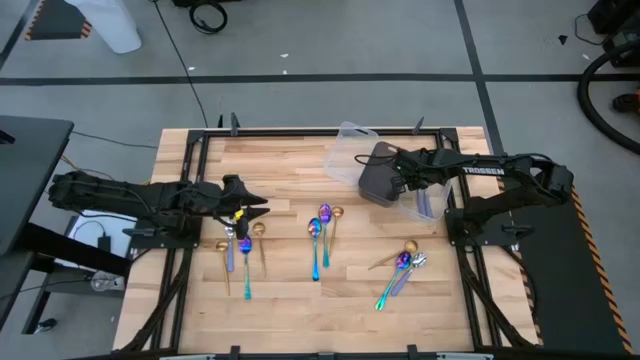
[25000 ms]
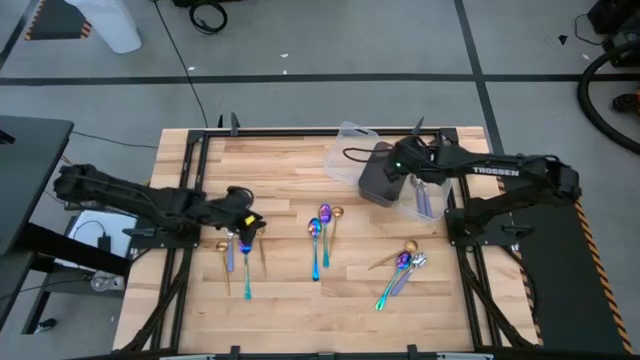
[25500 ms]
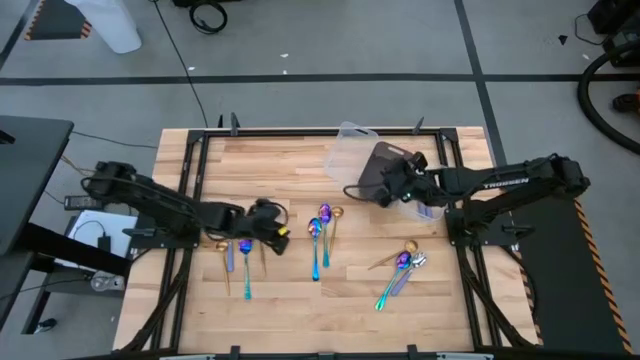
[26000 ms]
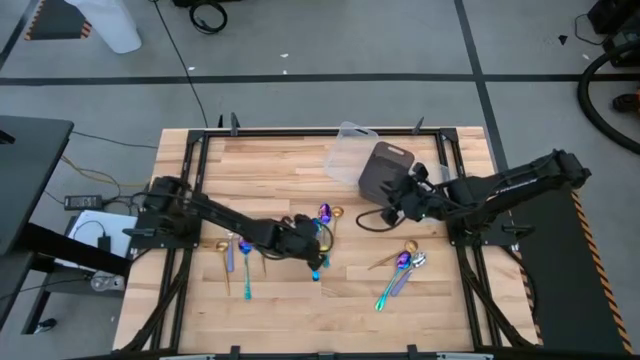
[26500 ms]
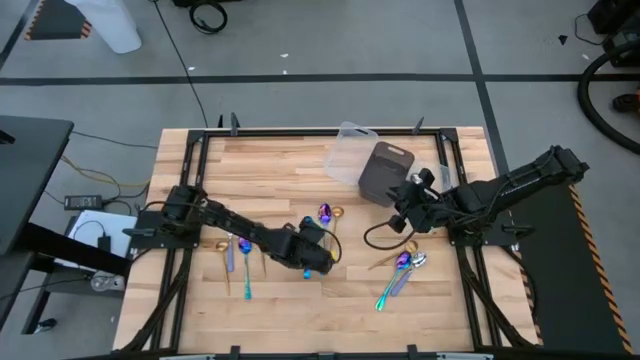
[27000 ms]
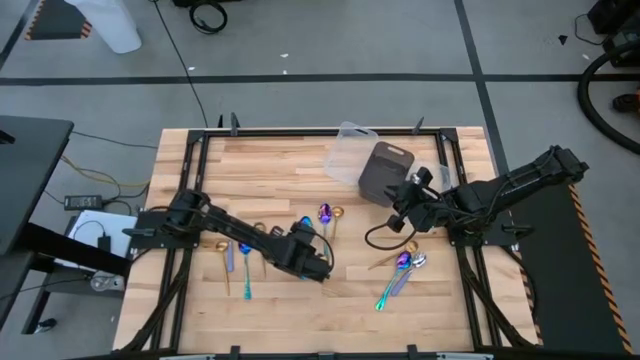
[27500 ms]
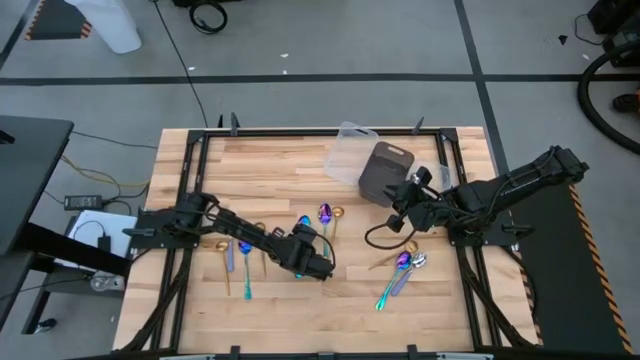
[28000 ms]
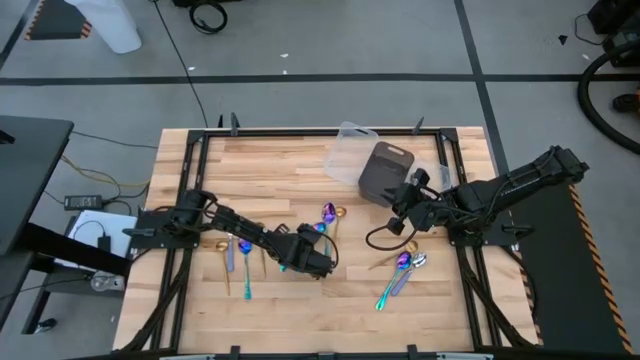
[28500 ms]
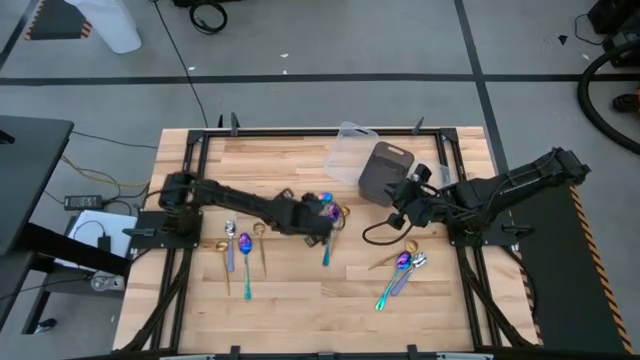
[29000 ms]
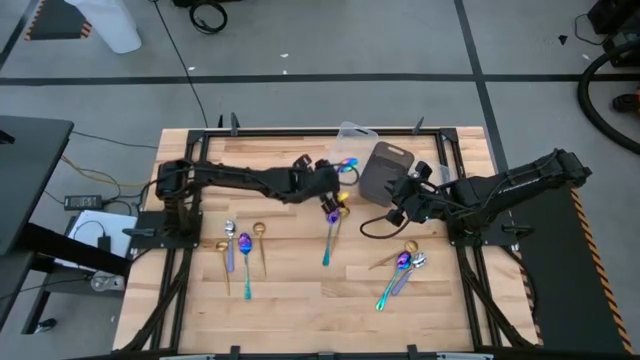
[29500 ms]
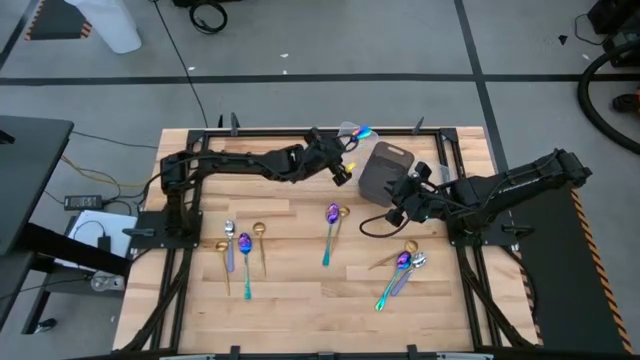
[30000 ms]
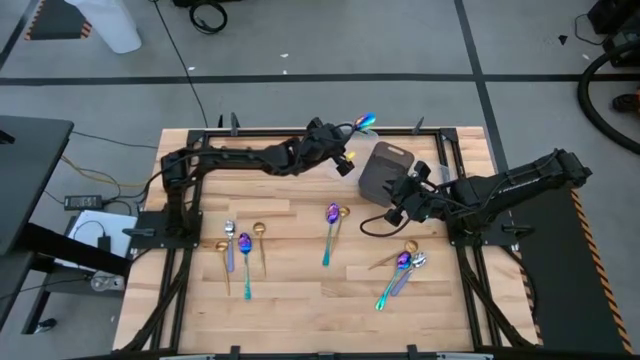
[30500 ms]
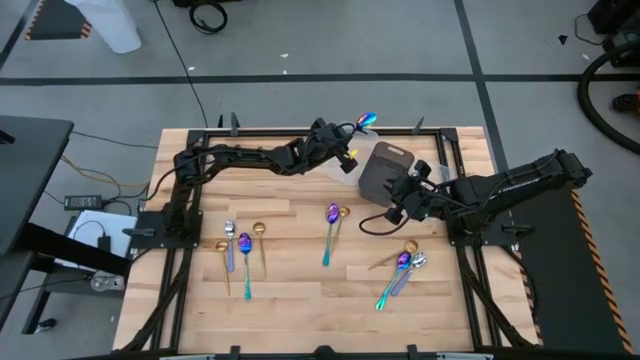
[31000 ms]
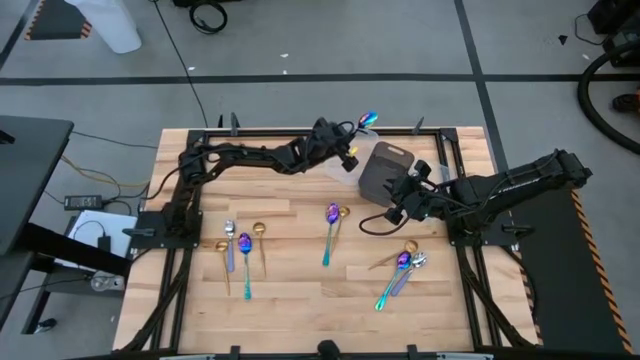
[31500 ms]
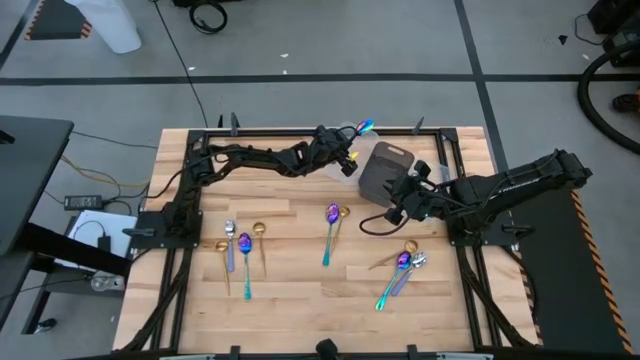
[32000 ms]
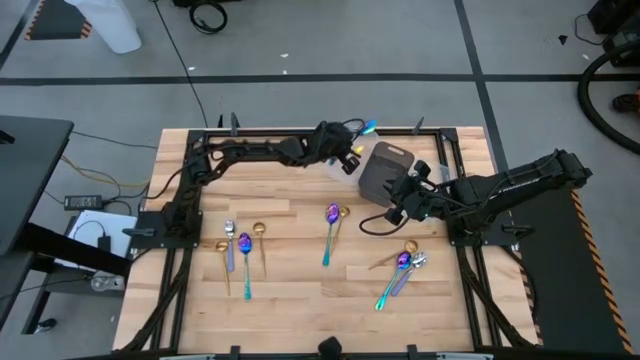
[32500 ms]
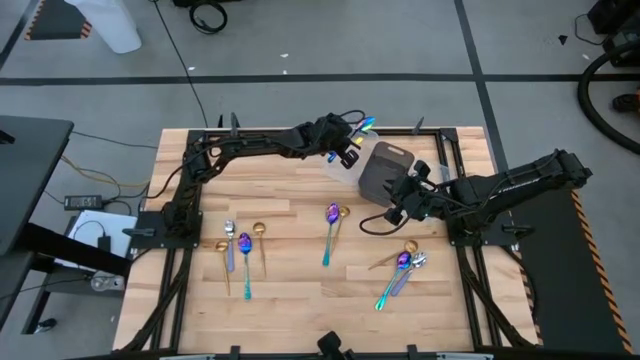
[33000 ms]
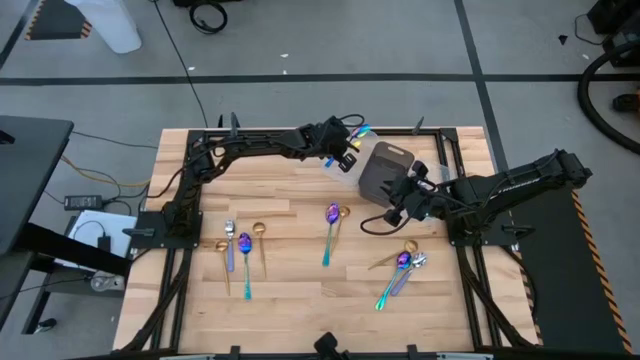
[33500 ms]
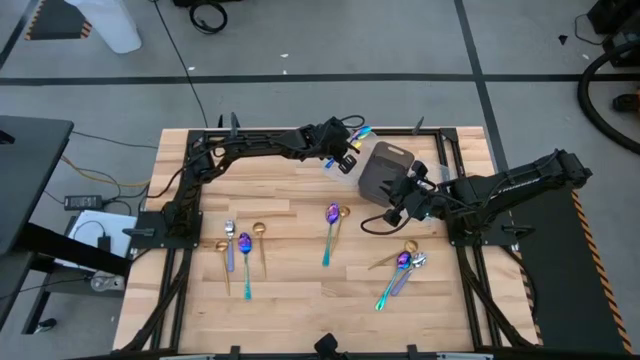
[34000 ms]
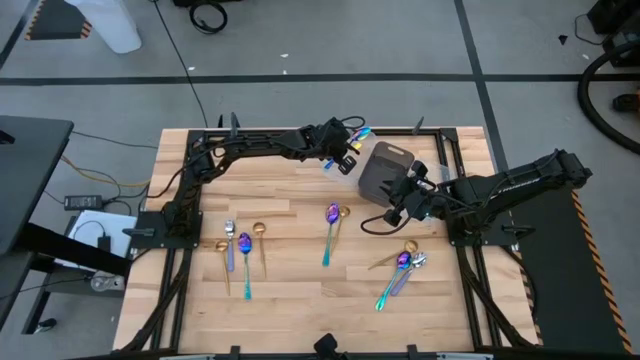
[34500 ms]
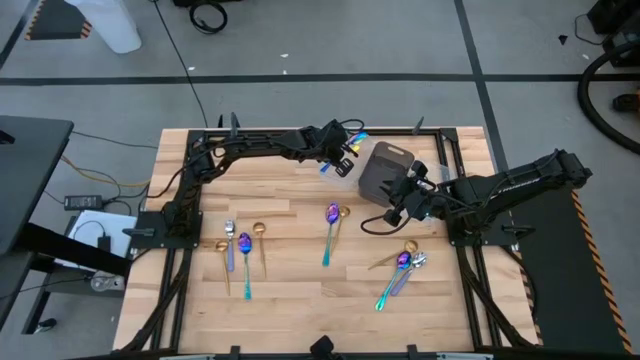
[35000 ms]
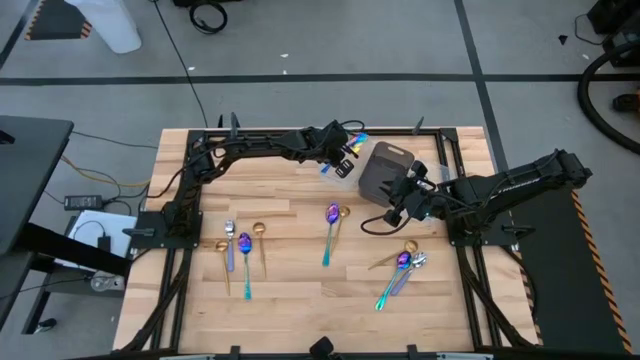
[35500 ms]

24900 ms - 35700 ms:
Task: Sort silverware by color (type)
Put the blue spoon into the left transparent bin

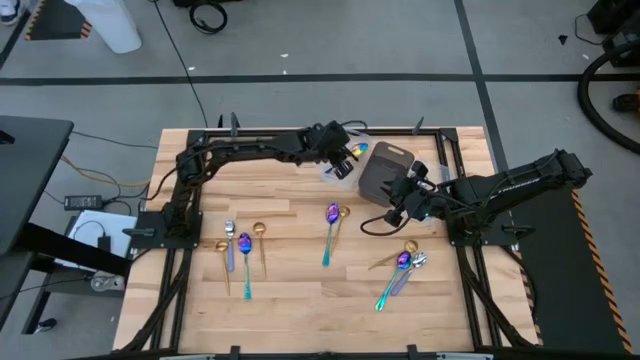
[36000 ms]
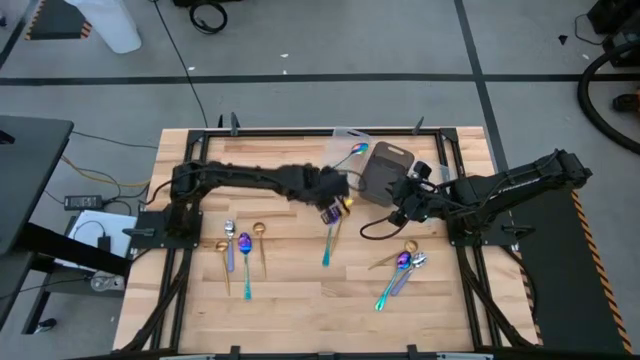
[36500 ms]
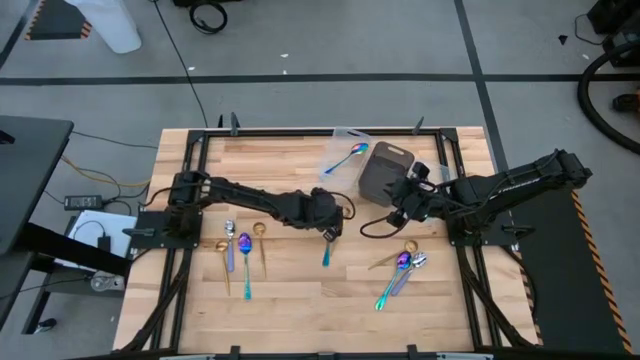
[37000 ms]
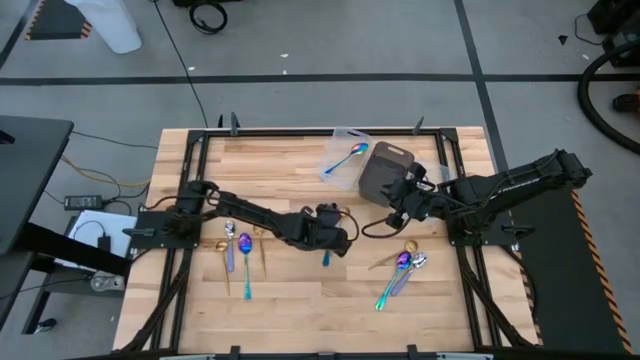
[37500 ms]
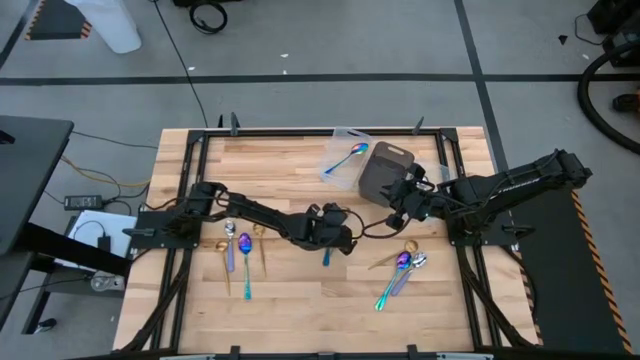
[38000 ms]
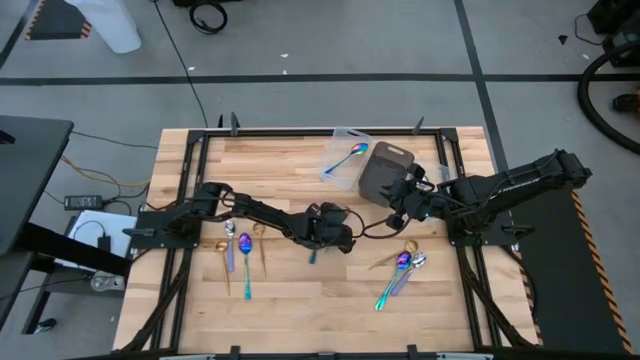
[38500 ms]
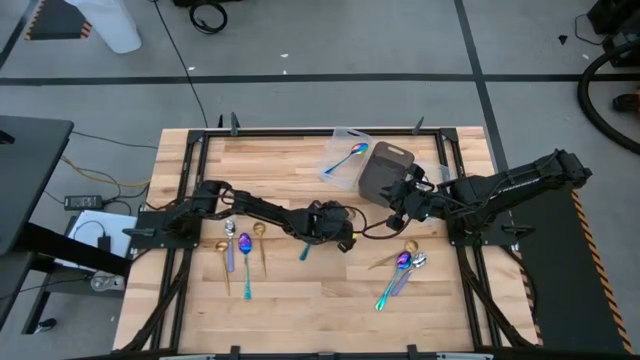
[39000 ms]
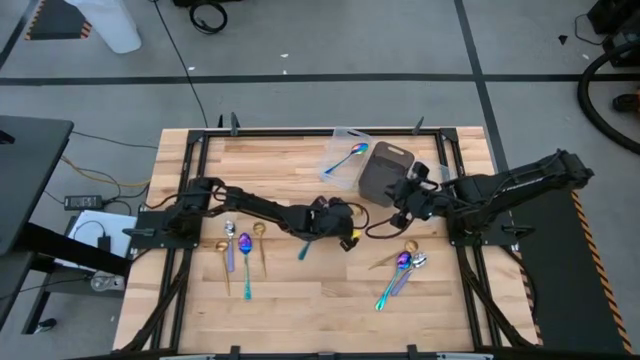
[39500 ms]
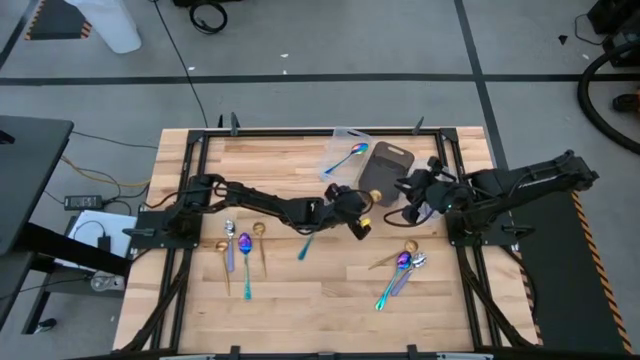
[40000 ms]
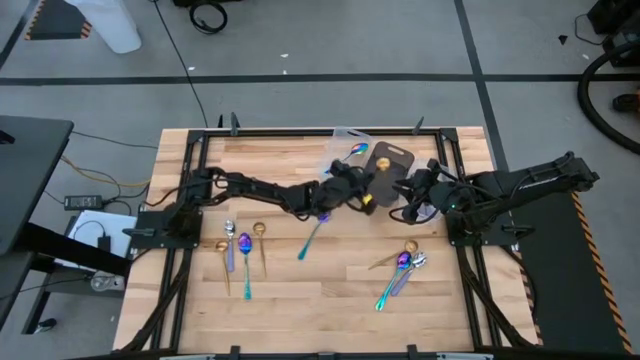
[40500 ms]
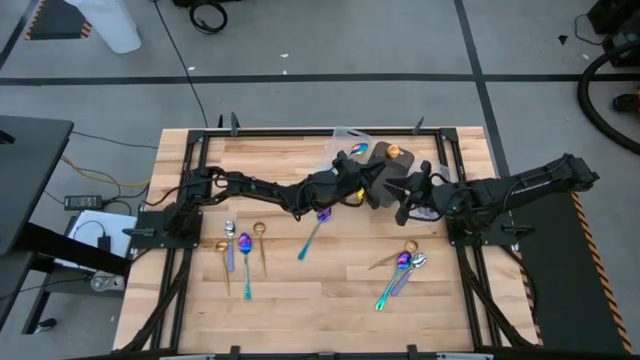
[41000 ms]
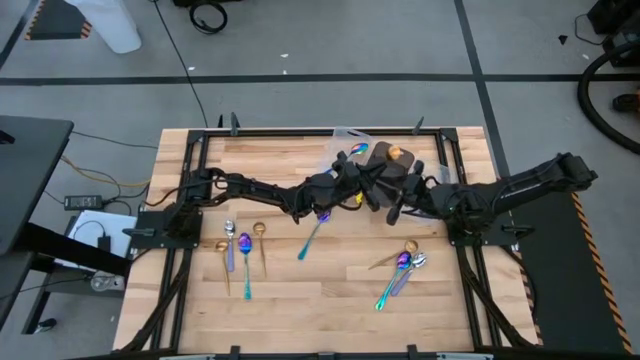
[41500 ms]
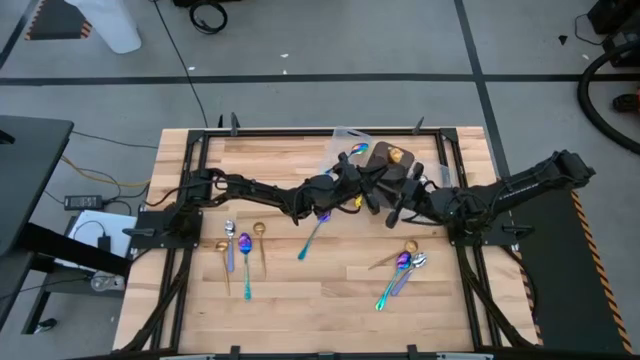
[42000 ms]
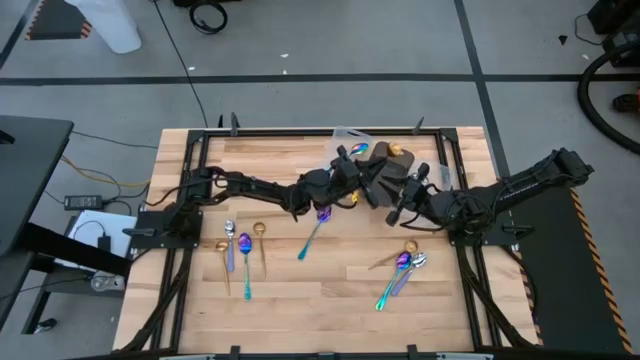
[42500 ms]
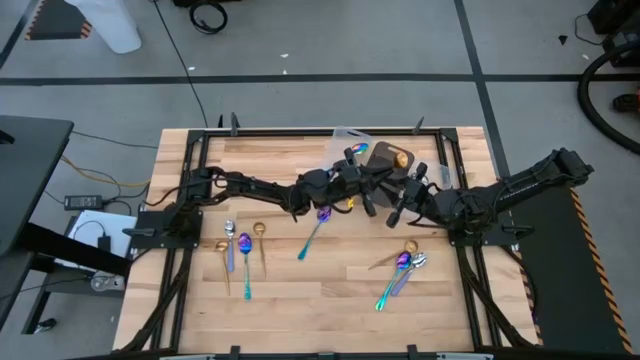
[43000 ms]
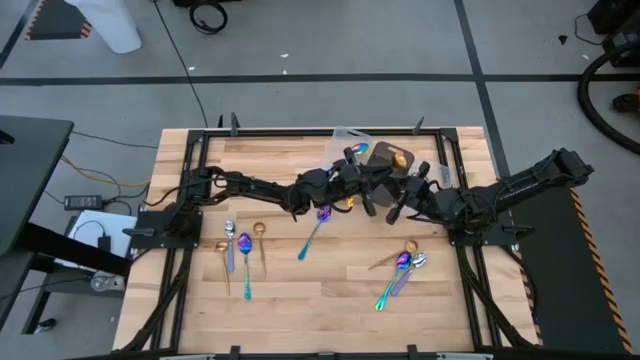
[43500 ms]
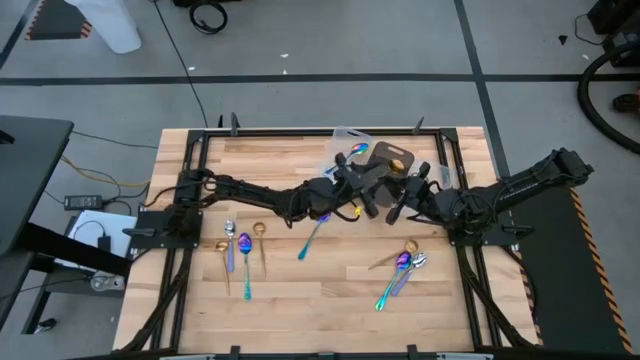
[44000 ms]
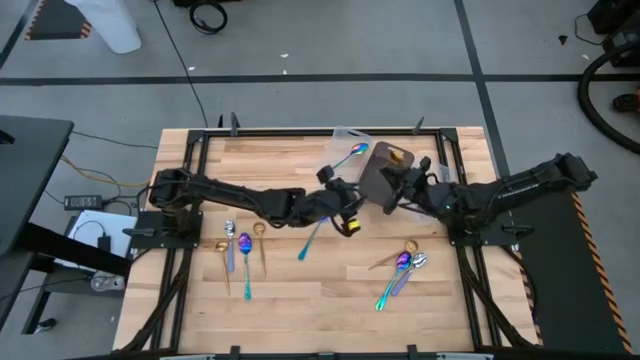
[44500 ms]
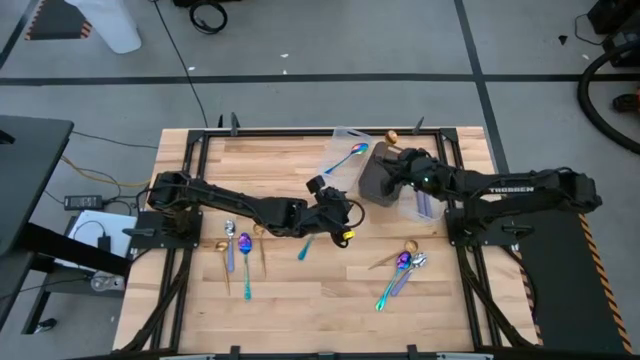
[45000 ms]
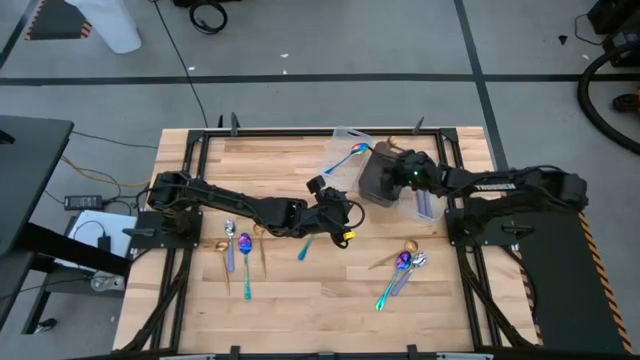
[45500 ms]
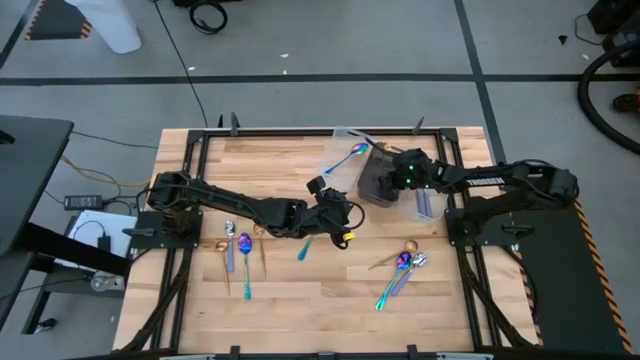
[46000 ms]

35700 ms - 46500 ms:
Put the gold spoon into the black bin

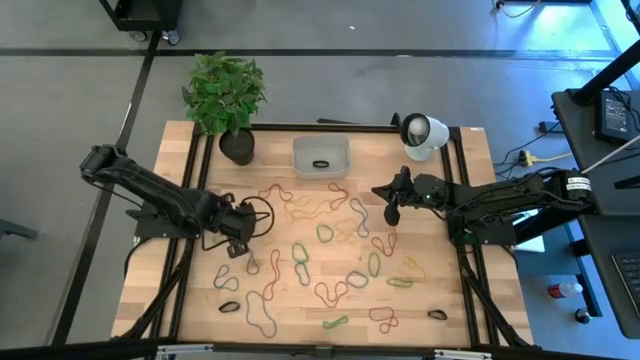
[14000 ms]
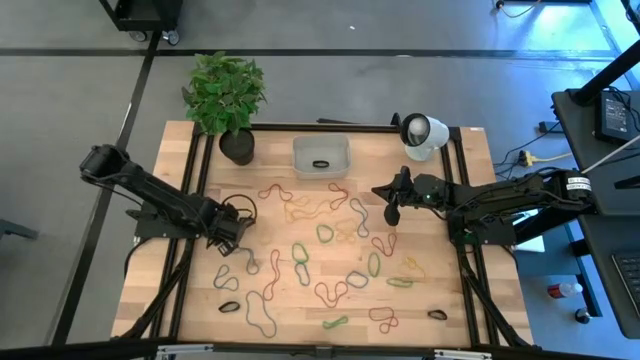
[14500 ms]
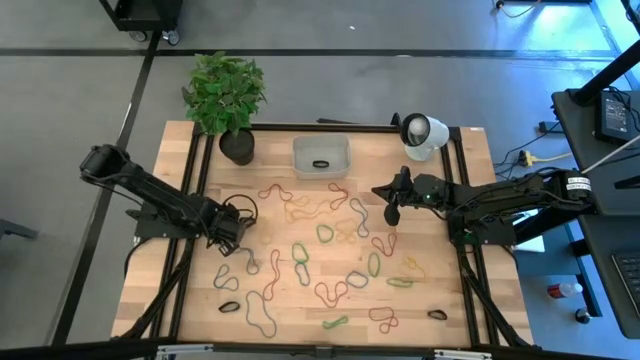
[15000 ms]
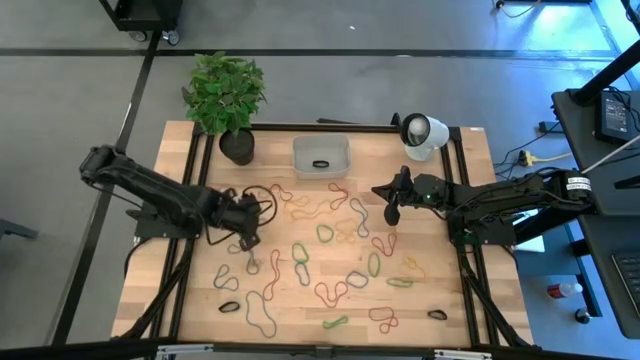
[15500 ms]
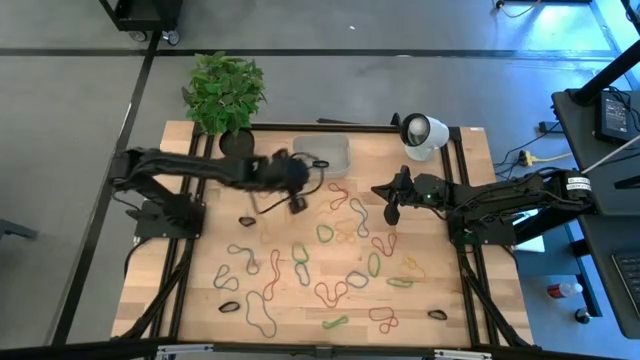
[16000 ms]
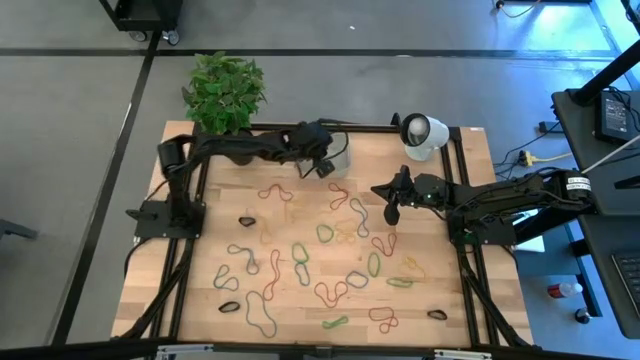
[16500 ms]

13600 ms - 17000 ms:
Task: Pick and place rubber bands into bin
Put the green rubber band into the gray bin
